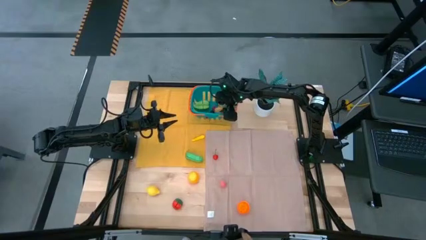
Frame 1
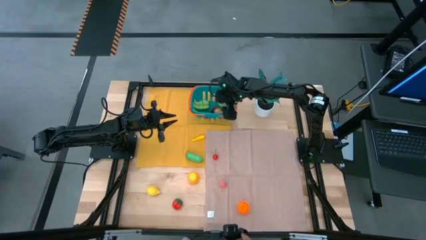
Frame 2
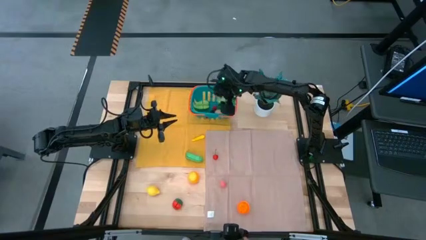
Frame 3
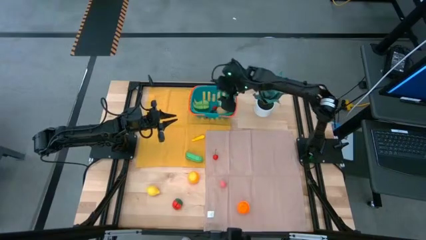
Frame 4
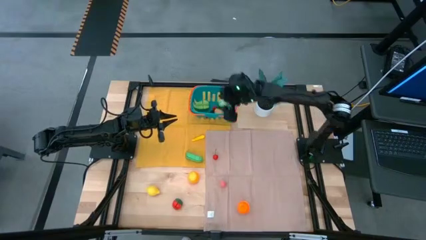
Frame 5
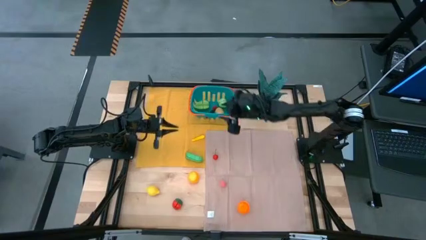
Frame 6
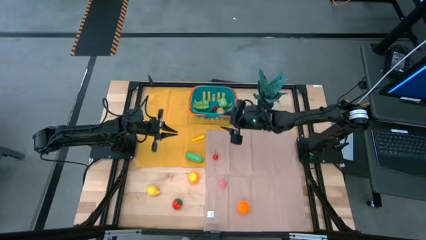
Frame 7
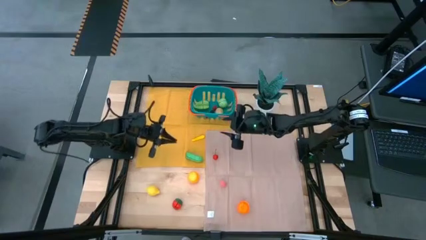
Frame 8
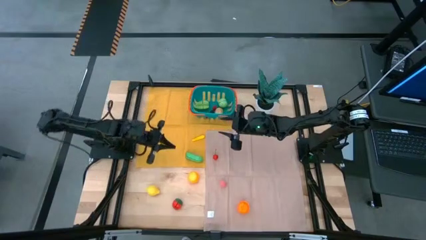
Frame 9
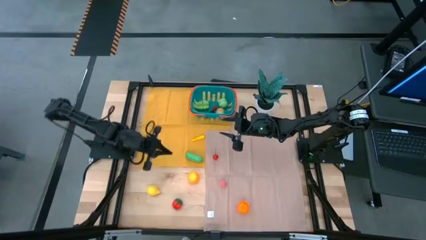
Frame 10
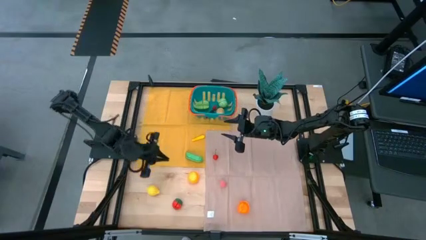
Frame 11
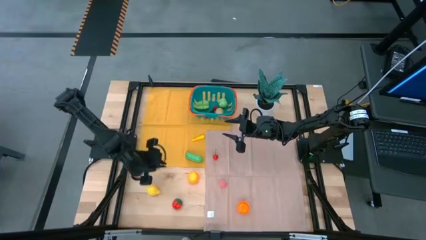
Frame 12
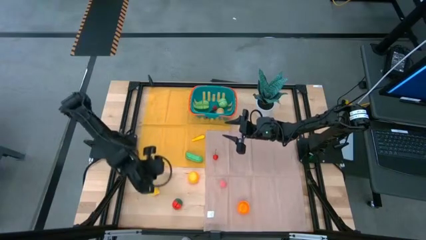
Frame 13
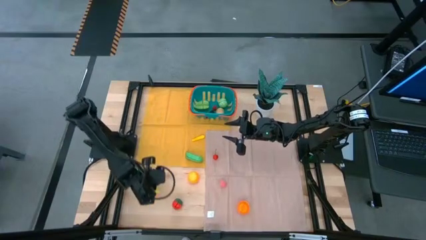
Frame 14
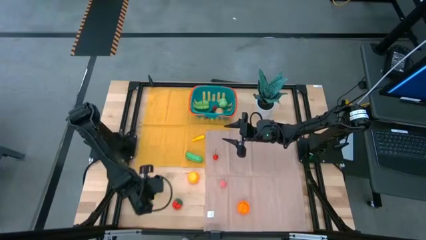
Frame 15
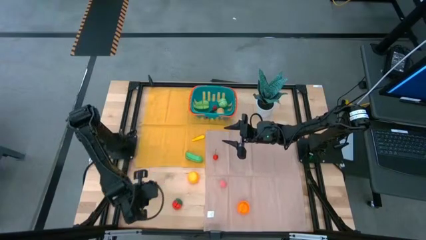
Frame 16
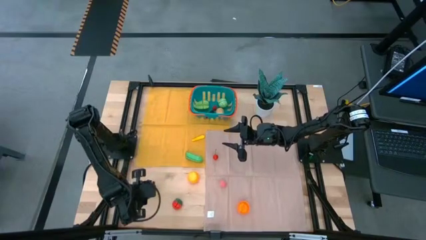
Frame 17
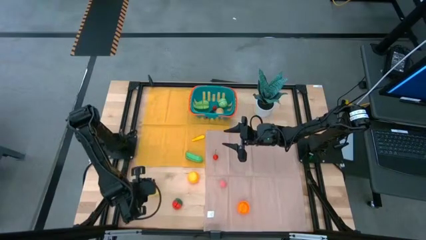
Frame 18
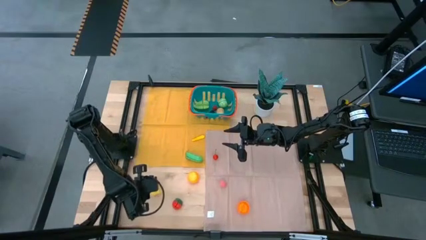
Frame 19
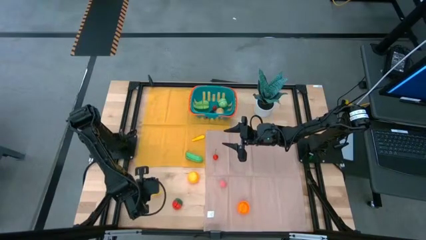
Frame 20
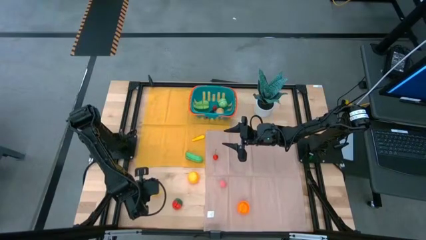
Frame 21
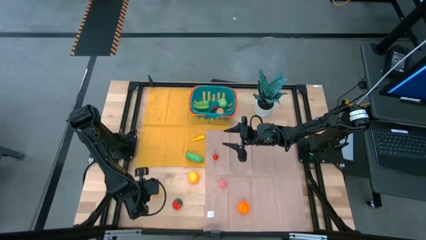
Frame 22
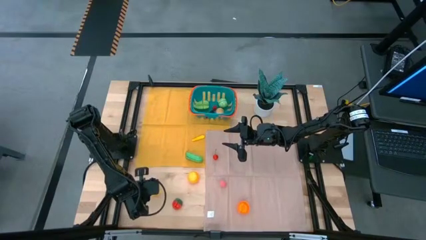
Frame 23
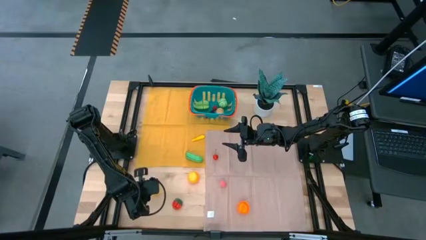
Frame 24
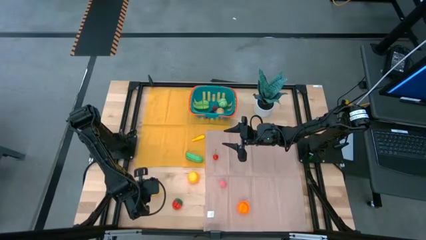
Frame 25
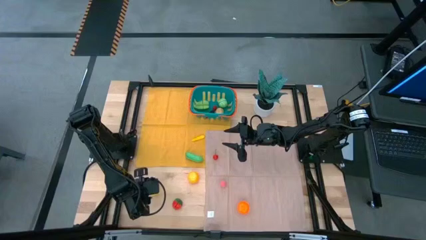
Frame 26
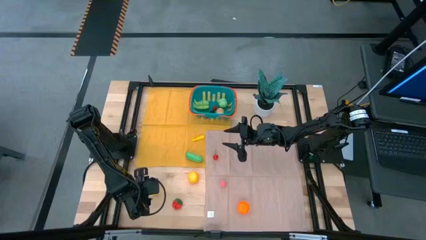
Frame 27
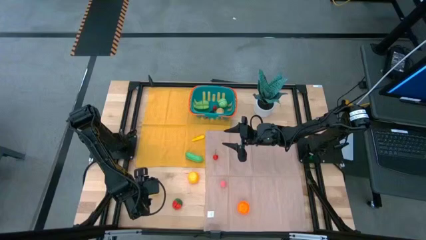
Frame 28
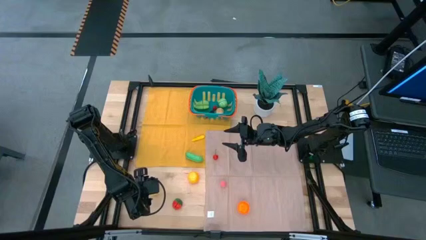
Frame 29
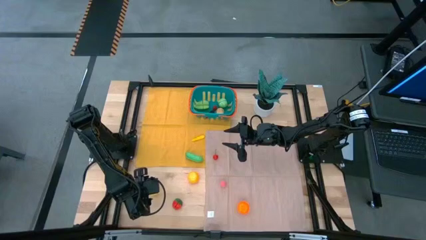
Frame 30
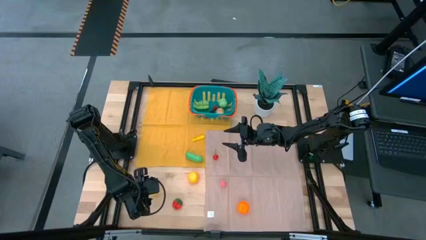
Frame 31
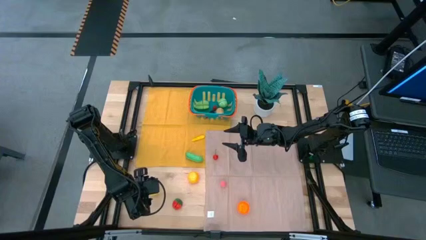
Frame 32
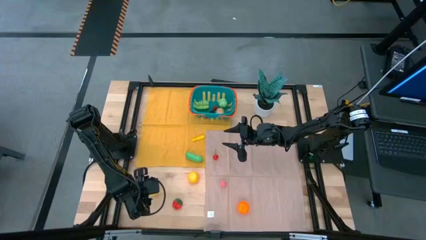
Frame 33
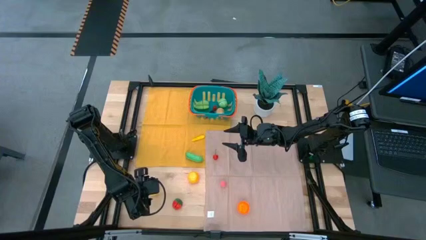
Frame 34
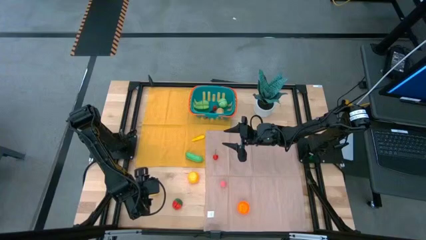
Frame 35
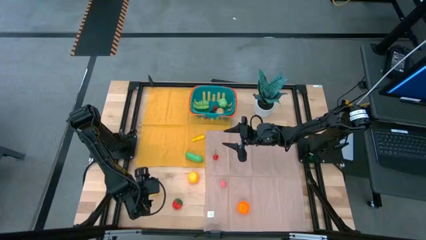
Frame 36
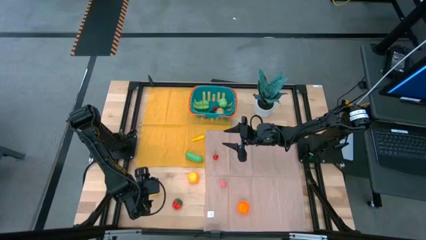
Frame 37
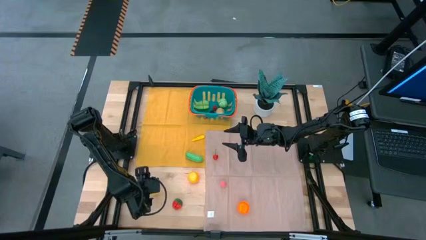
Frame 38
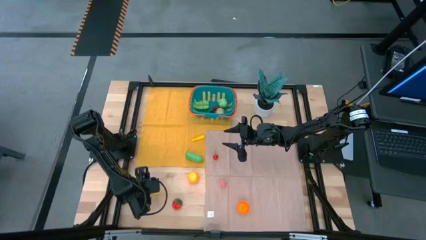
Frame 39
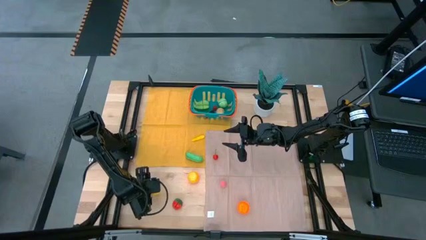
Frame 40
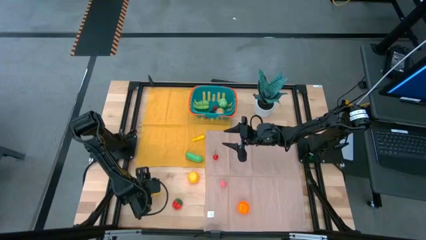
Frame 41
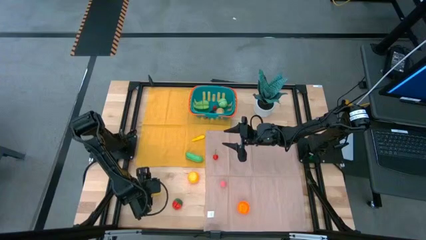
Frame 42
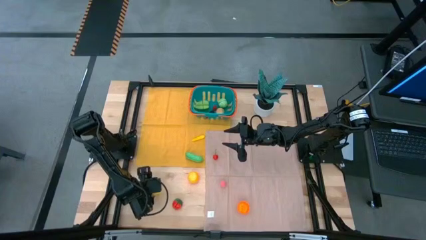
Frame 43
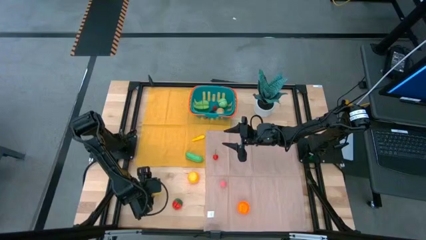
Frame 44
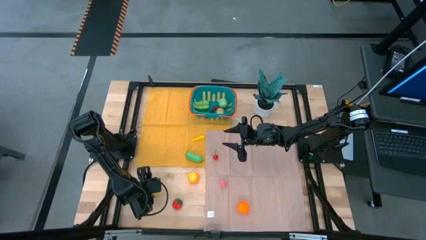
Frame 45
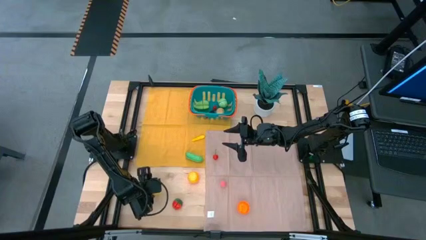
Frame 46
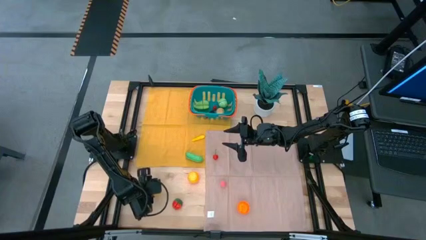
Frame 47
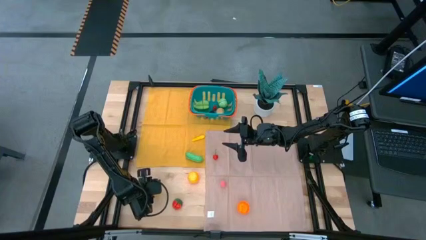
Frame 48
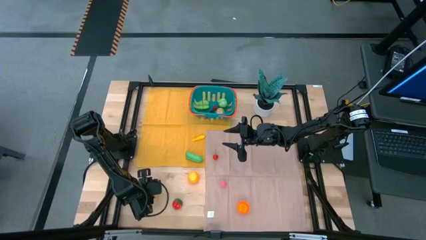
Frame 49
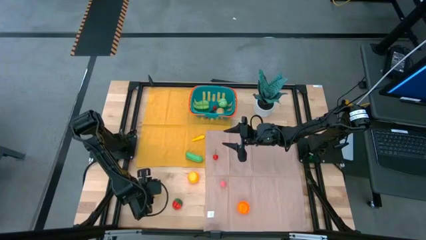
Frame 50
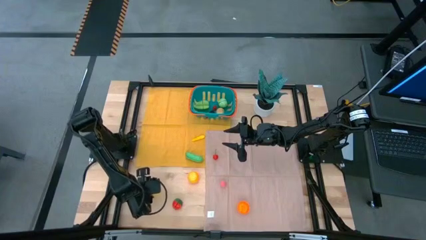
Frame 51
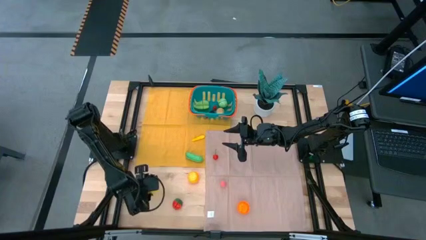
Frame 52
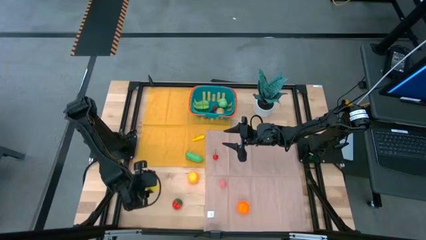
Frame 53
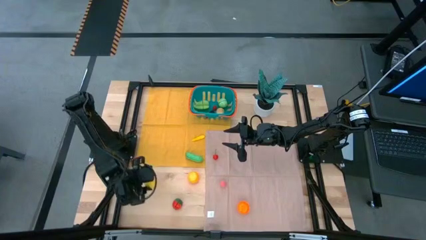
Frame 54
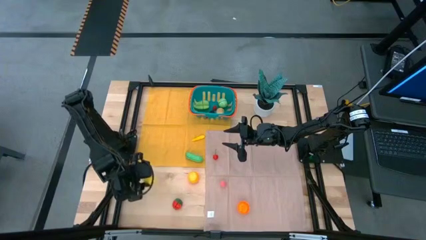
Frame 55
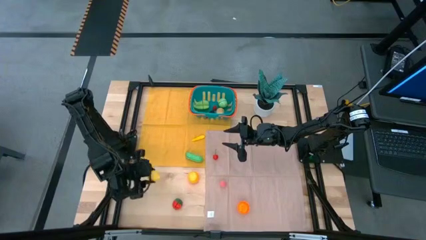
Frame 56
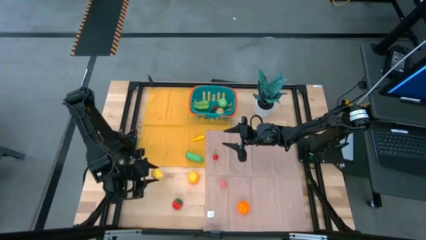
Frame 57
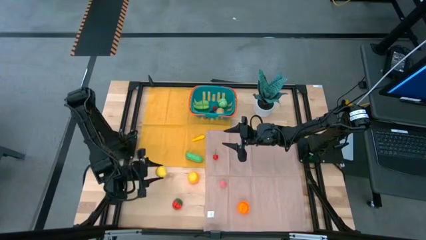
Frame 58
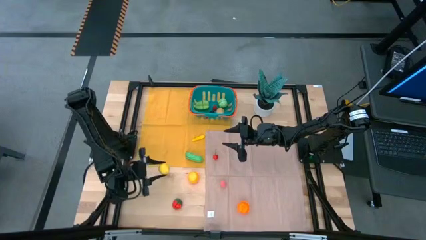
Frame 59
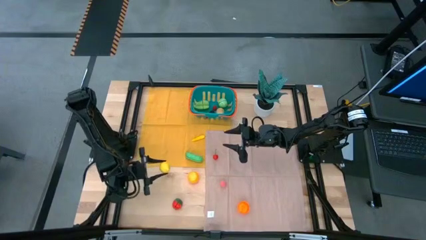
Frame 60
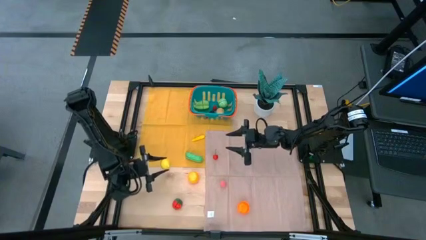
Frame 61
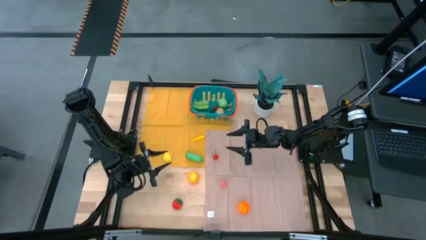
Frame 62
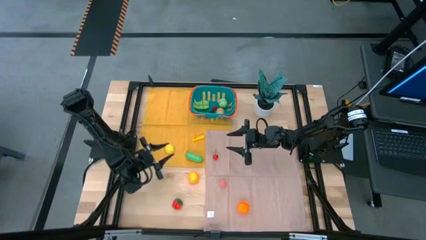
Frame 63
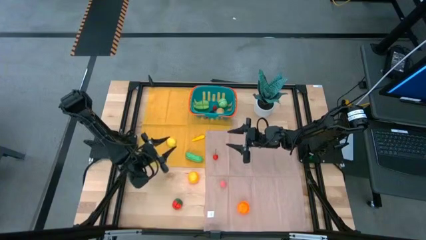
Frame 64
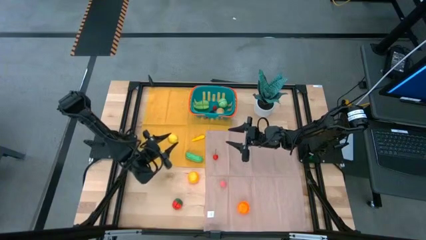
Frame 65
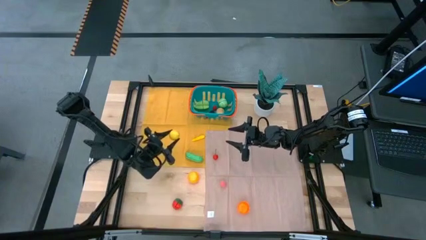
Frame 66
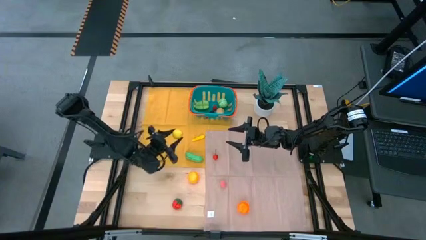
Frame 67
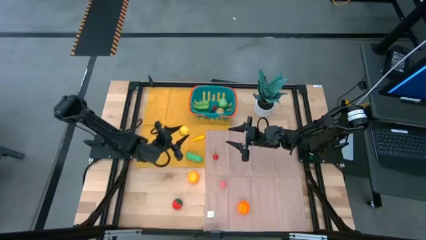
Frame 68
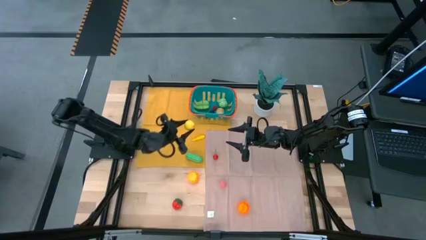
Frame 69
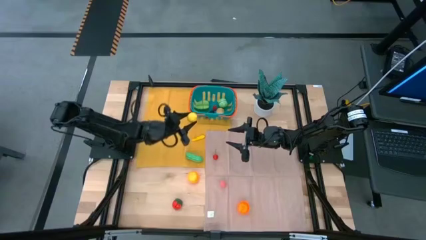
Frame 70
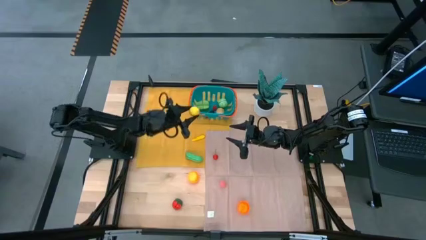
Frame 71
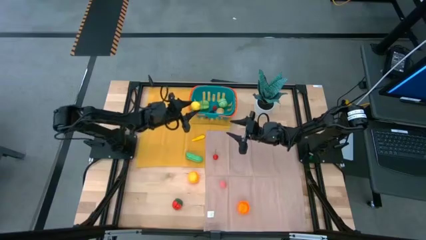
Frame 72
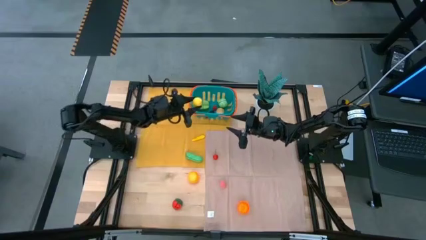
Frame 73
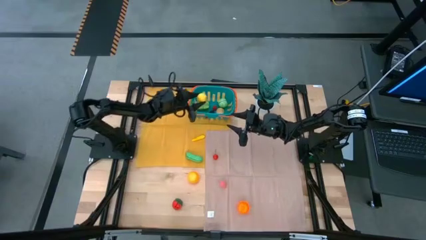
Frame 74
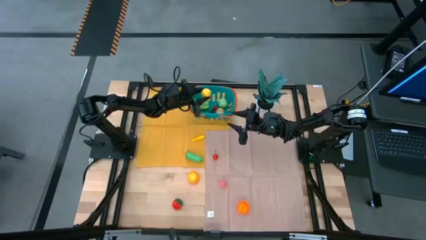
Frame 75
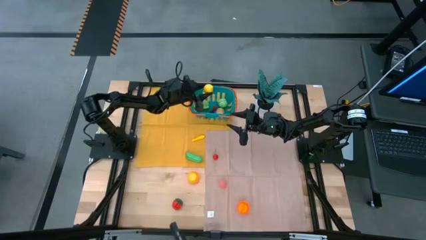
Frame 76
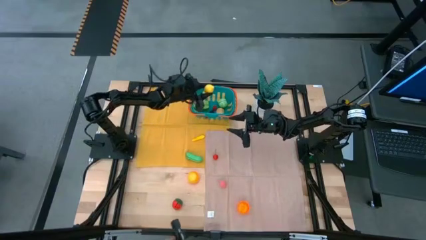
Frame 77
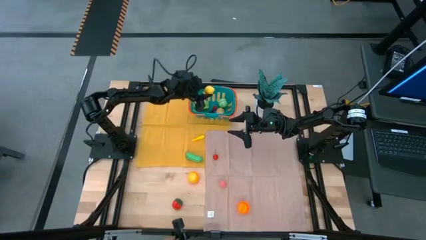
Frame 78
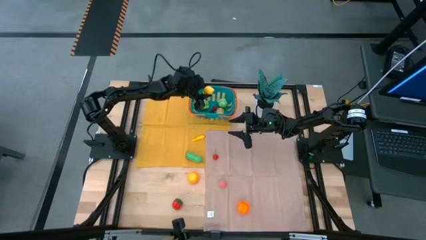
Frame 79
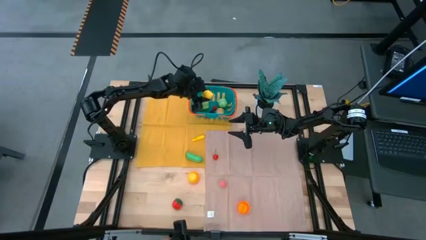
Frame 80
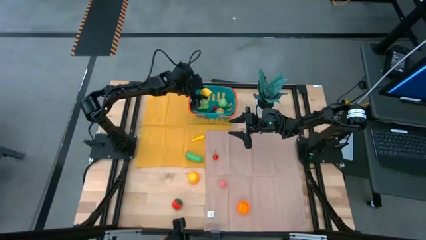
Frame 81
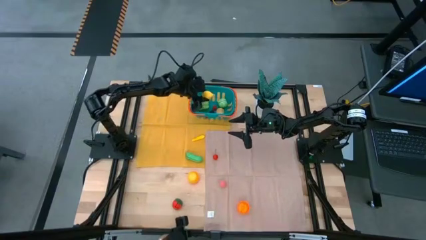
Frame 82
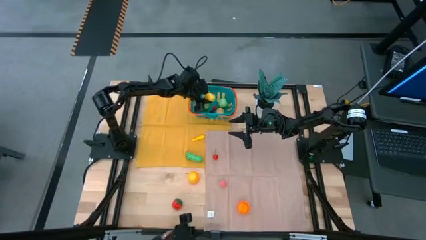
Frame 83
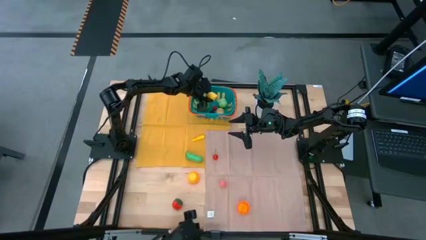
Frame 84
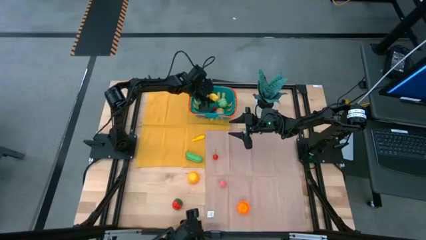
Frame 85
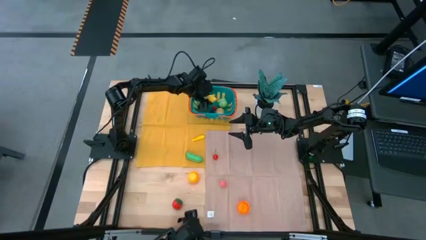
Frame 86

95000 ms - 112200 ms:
Task: Pick and placing Produce into tupperware
Put the yellow lemon into the blue basket
